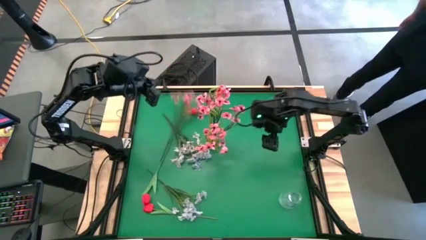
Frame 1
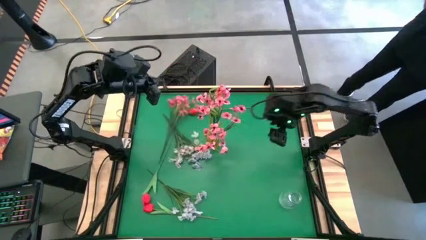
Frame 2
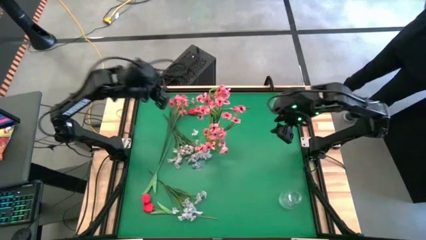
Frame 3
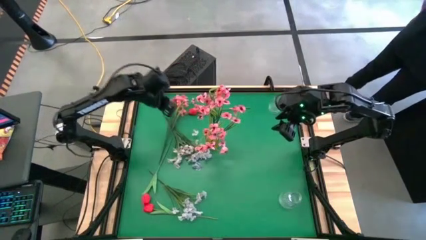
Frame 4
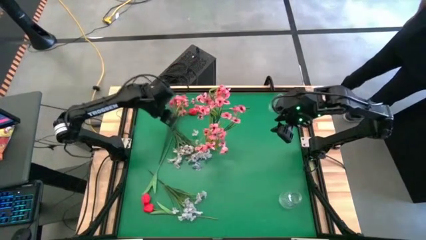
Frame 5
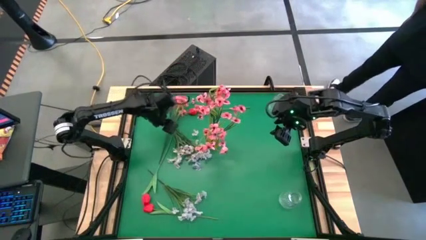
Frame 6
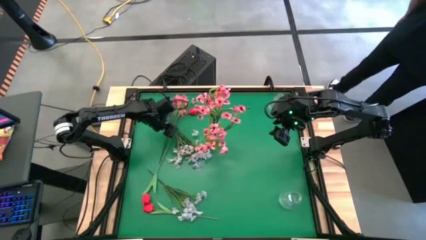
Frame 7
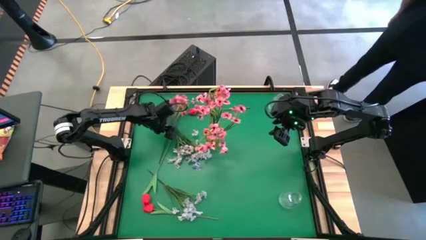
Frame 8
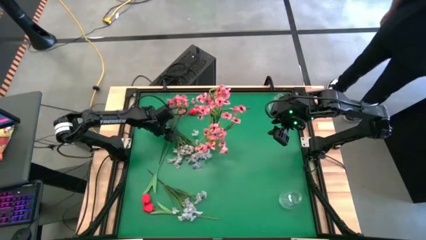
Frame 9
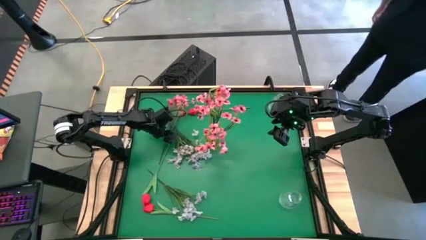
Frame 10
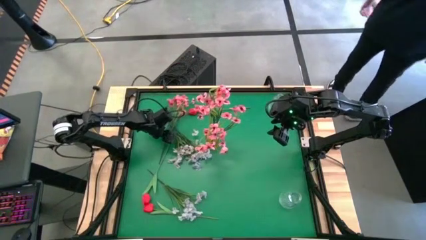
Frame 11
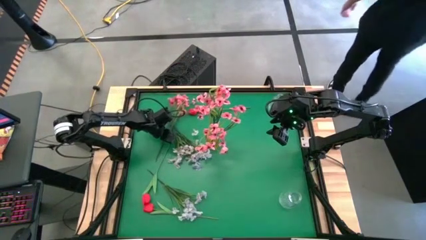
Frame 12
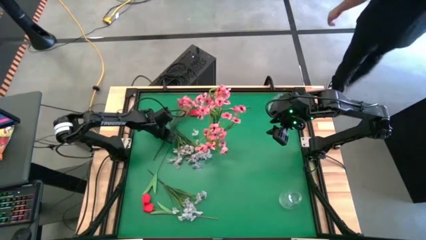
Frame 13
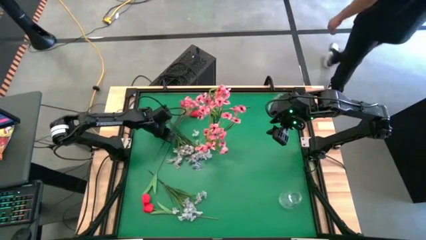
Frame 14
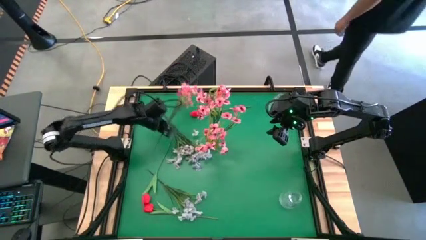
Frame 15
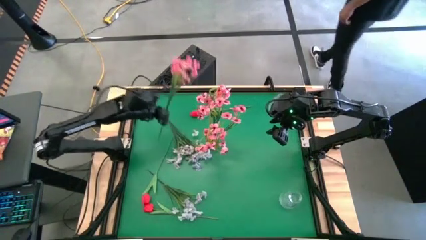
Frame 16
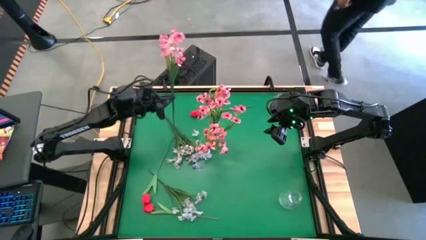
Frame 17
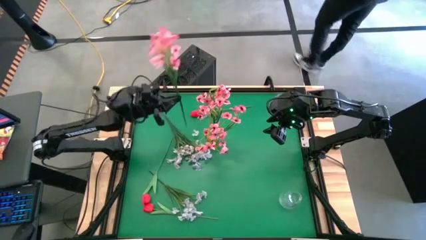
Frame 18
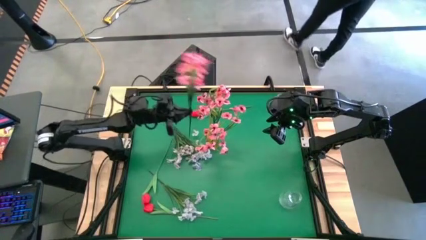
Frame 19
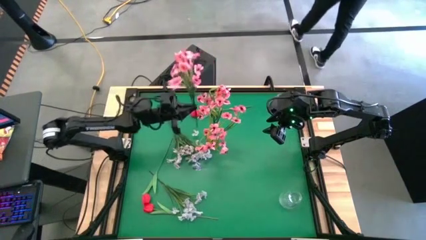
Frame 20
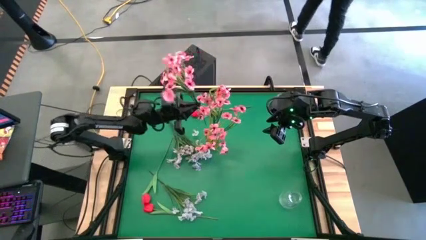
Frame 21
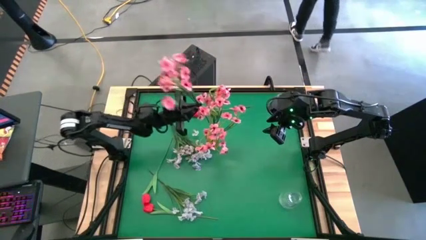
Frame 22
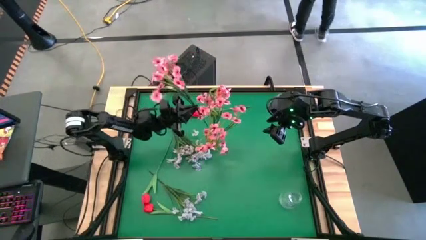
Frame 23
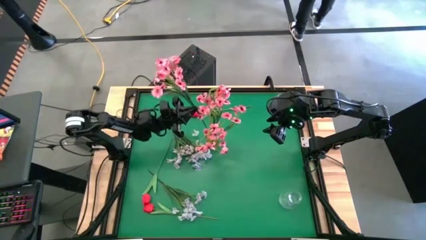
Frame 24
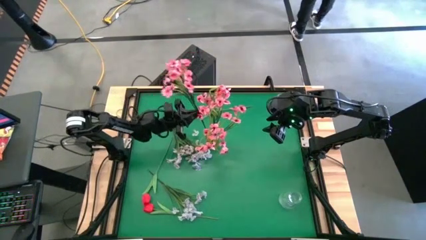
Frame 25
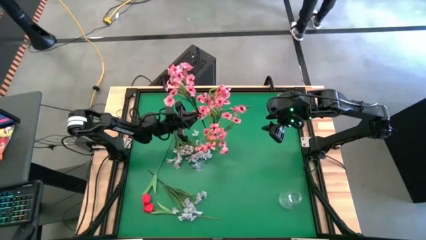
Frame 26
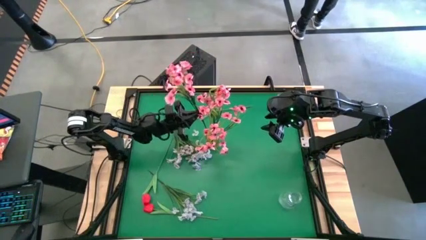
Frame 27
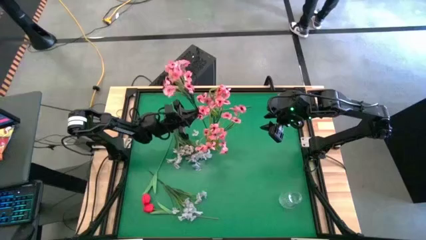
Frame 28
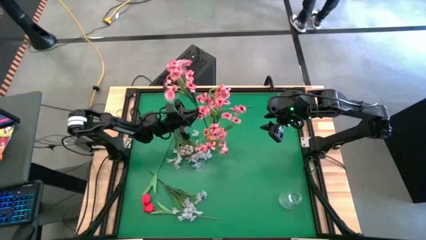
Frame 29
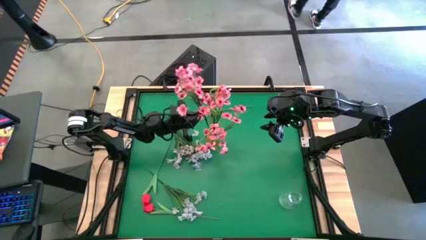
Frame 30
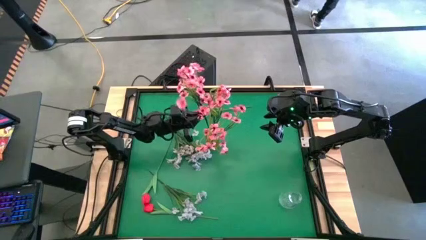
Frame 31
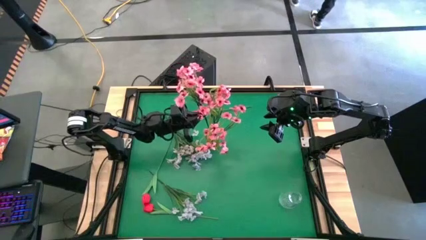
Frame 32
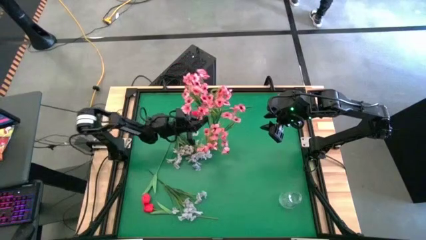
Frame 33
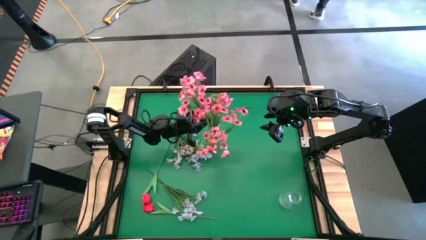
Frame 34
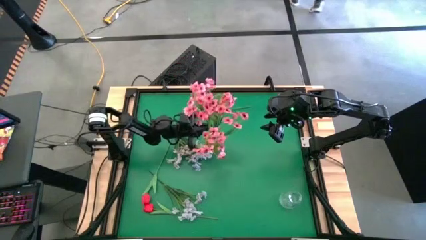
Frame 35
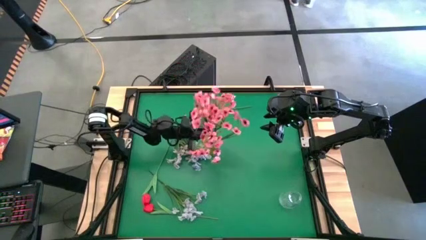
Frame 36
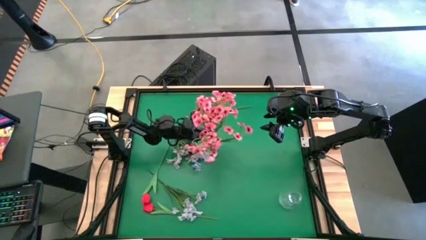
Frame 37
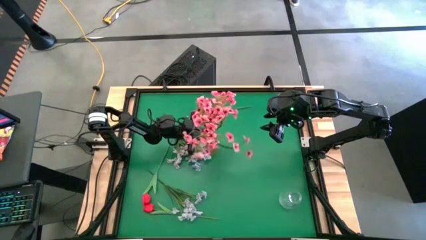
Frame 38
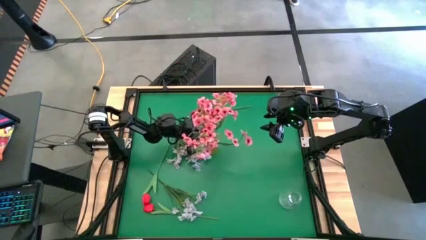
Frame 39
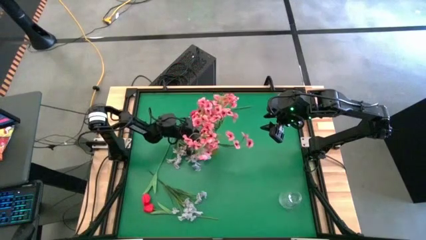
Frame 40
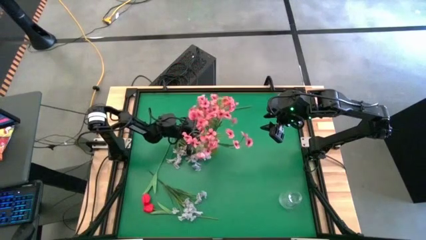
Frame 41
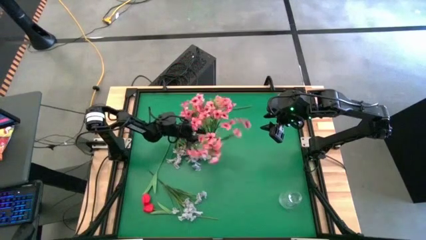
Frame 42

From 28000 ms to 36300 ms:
Task: Sort flowers into vase by color
Put the pink flowers into the yellow vase

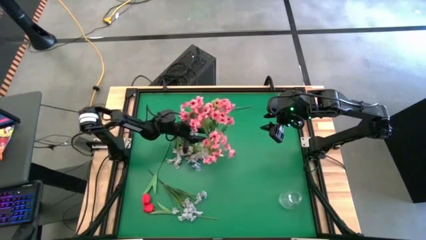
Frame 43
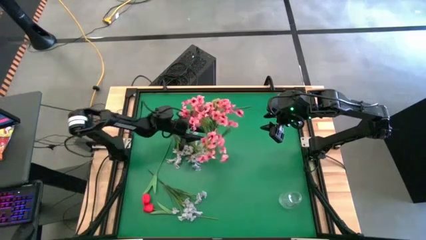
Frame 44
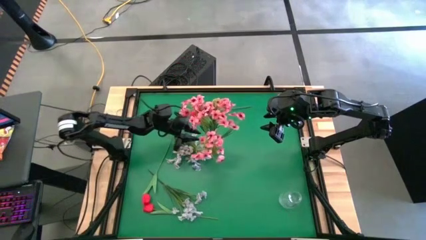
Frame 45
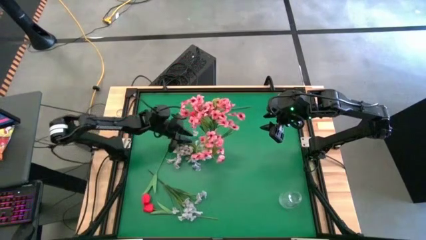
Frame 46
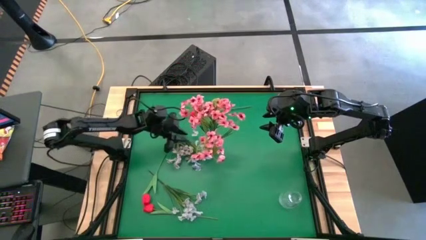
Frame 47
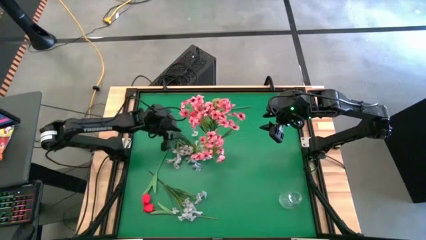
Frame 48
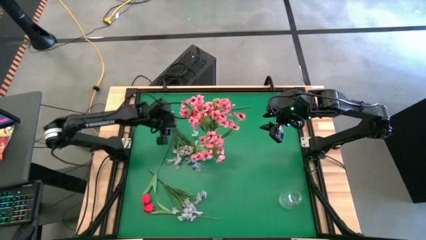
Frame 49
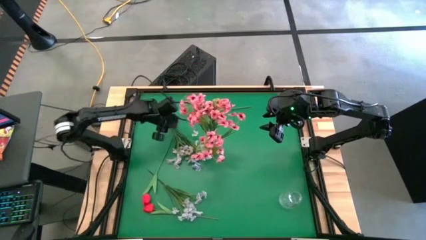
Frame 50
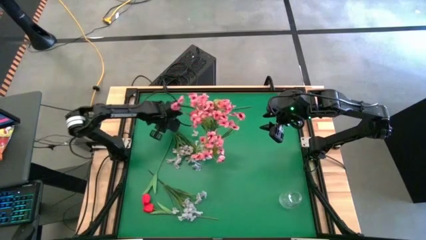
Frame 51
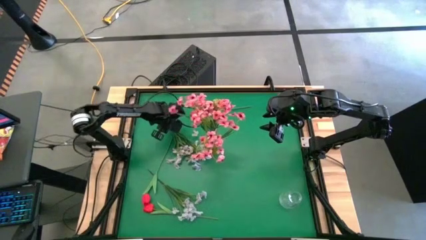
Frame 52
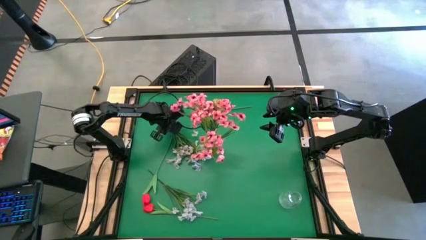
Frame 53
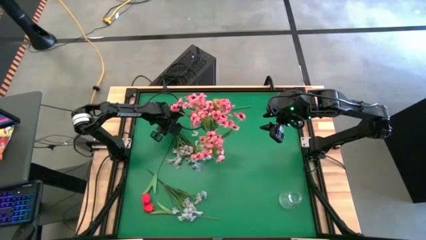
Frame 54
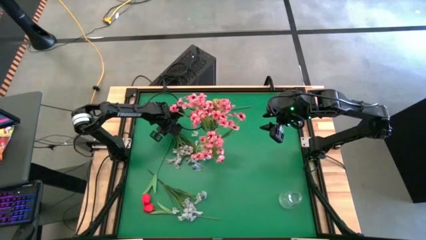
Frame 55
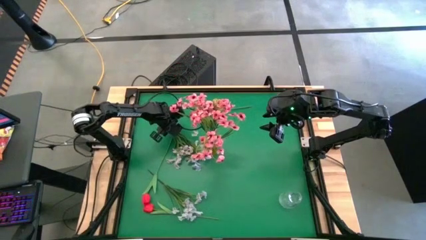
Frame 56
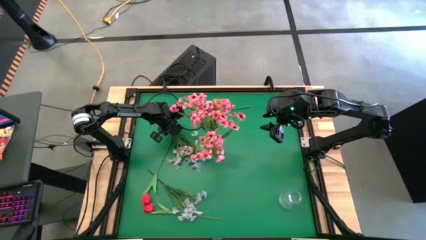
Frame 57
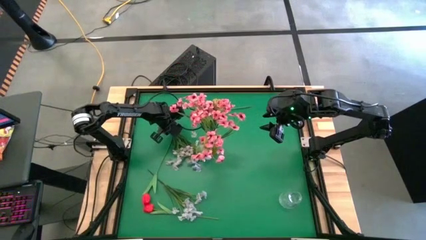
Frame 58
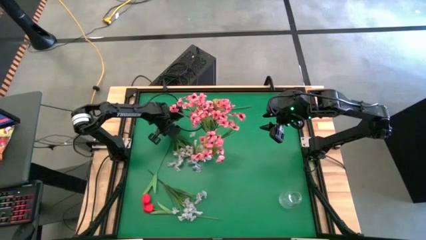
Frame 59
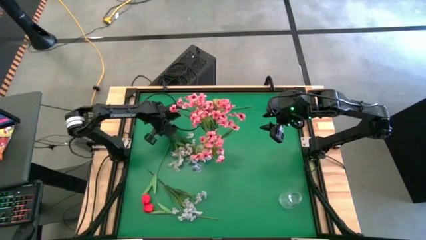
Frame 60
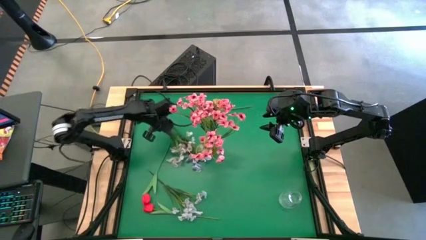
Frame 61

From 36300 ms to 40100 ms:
Put the white flowers into the top transparent vase

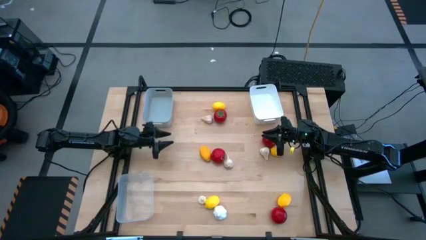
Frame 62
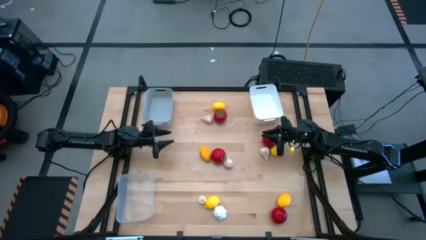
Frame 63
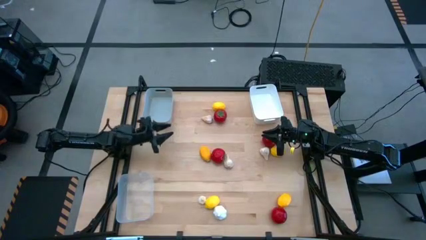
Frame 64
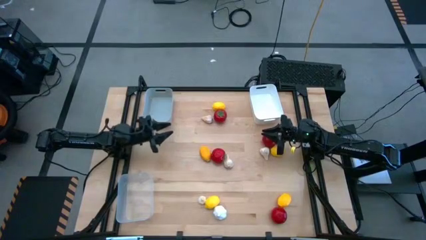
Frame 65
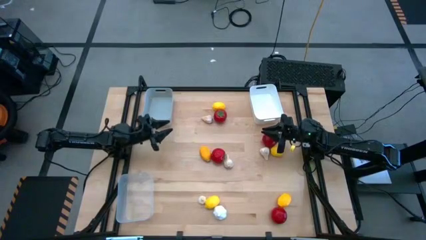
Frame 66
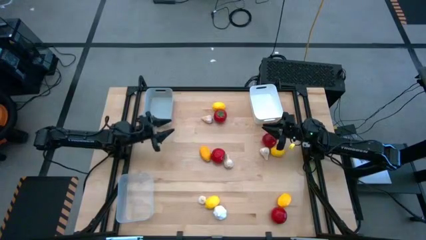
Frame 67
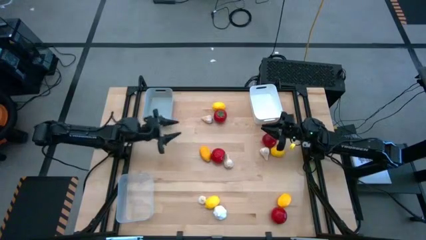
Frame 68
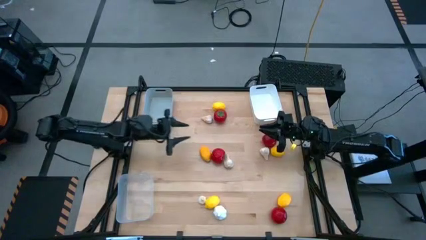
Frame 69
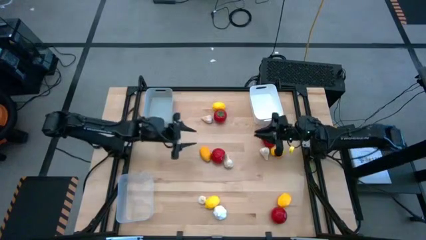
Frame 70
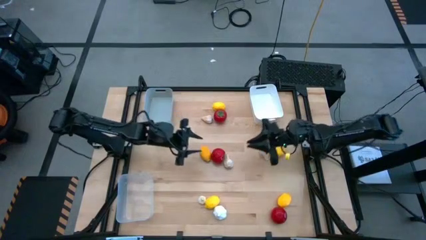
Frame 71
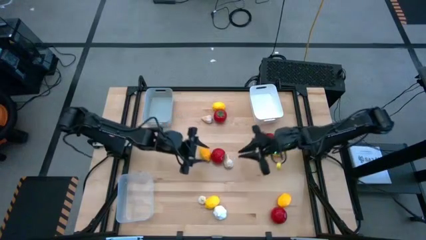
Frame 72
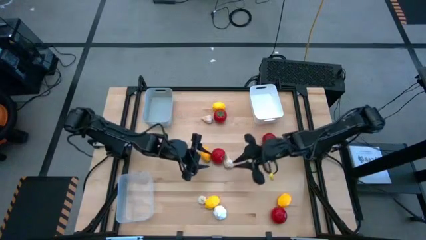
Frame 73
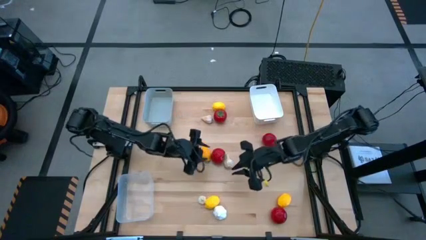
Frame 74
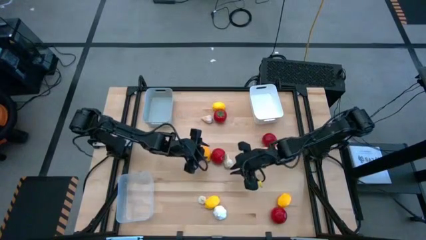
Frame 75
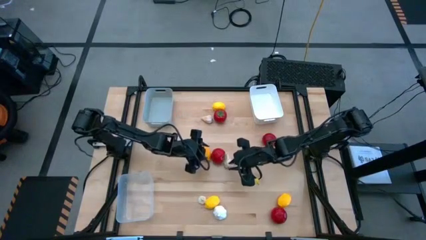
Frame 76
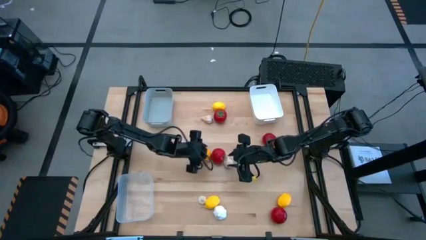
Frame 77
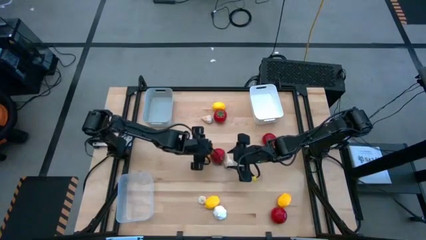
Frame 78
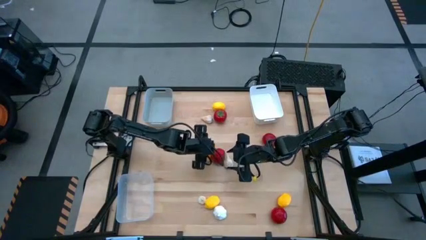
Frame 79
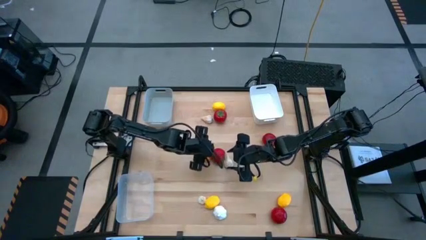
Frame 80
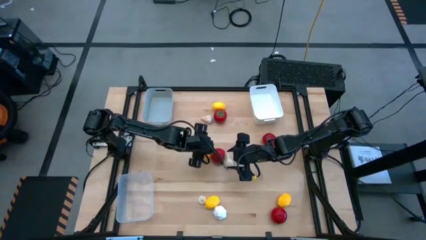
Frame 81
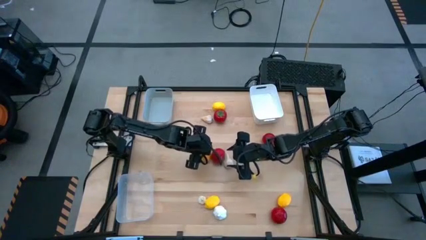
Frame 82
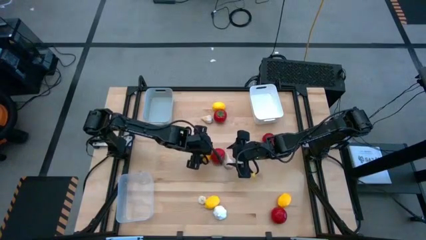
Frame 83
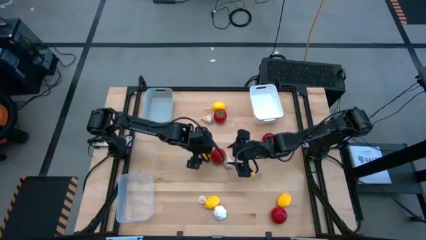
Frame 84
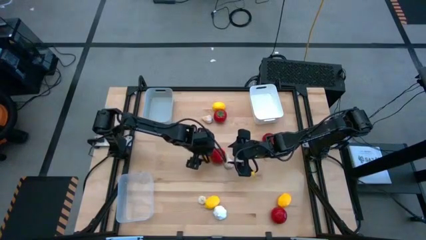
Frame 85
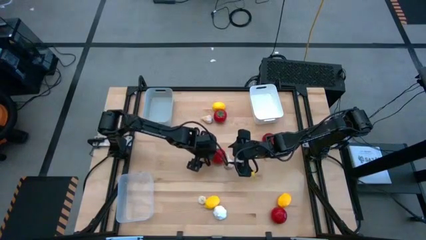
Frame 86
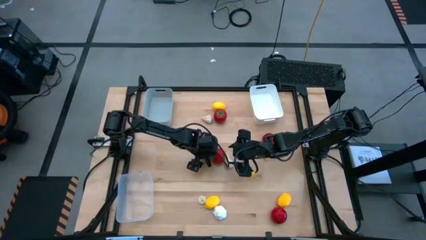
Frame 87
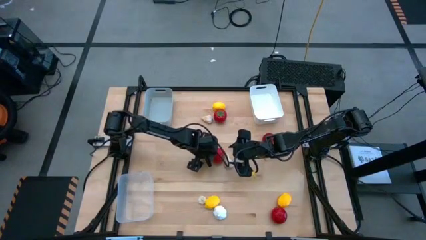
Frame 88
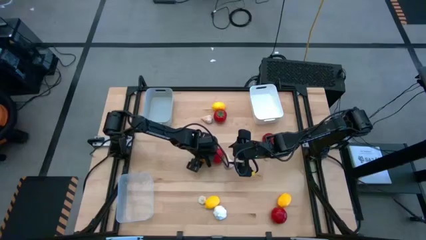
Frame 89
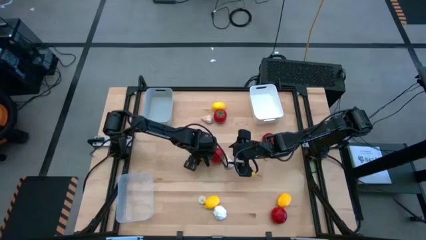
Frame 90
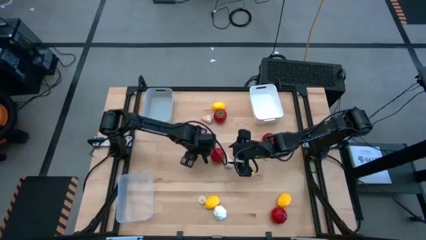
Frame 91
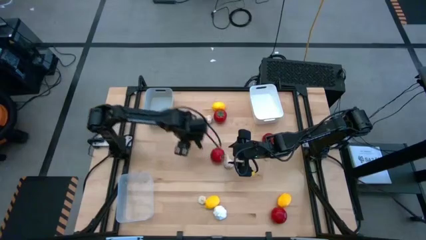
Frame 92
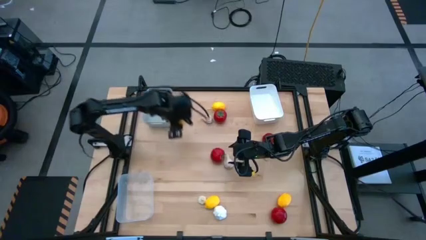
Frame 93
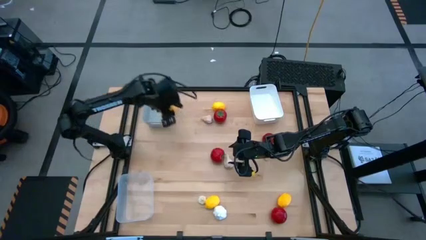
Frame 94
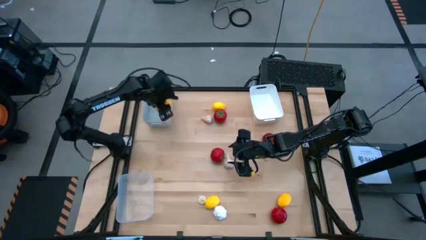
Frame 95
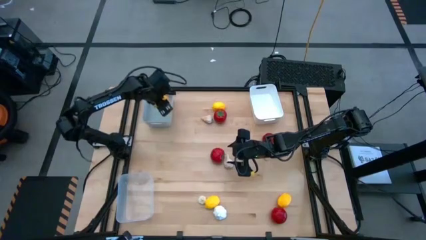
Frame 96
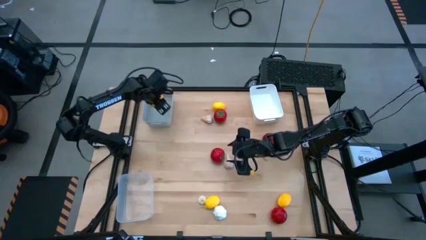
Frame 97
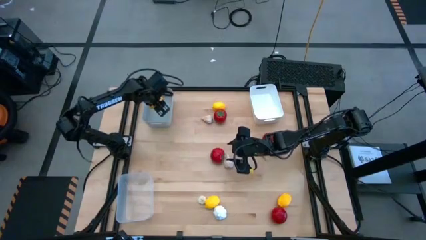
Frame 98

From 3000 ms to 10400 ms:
Task: Sort produce into baskets
Put the yellow lemon into the gray bin
